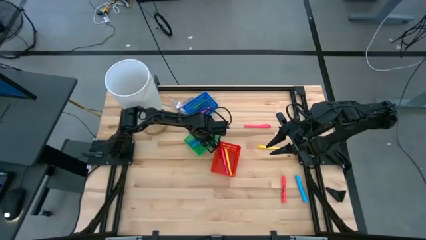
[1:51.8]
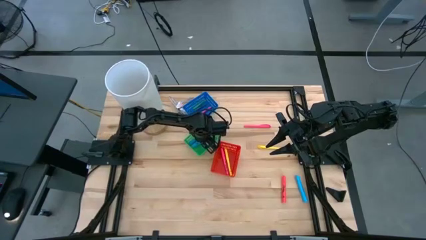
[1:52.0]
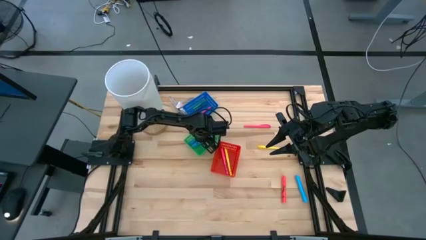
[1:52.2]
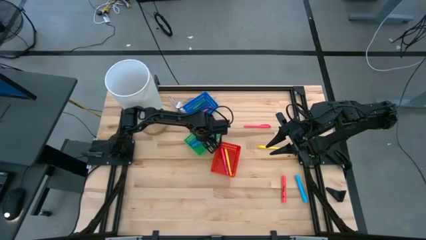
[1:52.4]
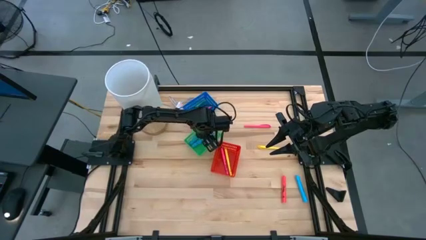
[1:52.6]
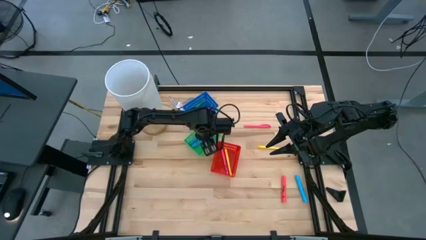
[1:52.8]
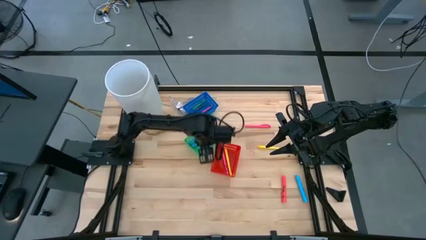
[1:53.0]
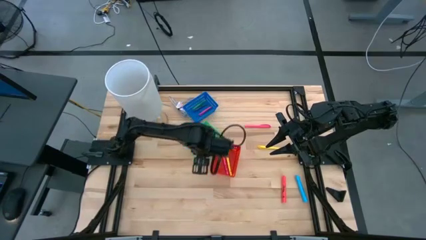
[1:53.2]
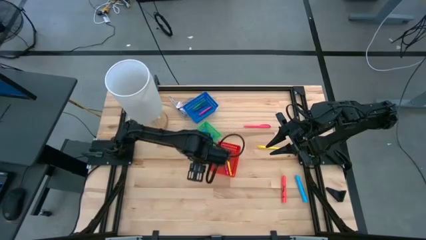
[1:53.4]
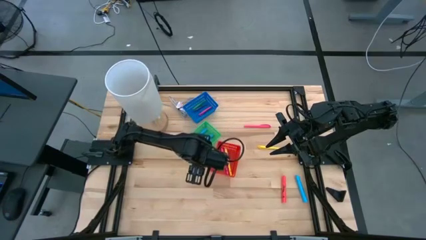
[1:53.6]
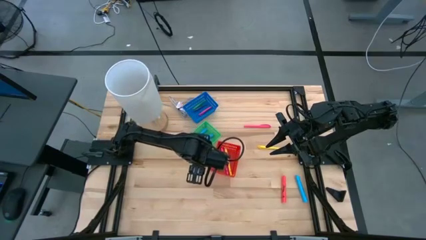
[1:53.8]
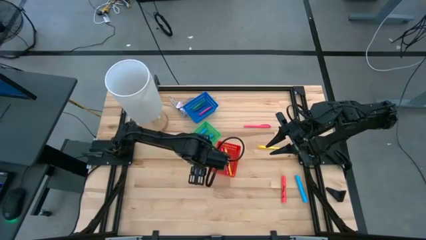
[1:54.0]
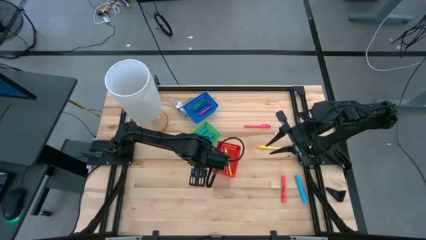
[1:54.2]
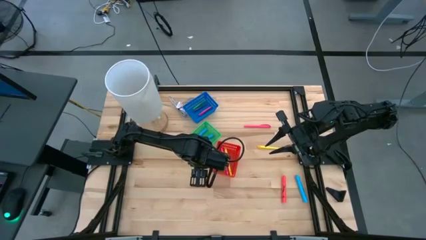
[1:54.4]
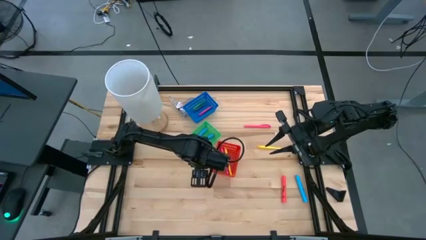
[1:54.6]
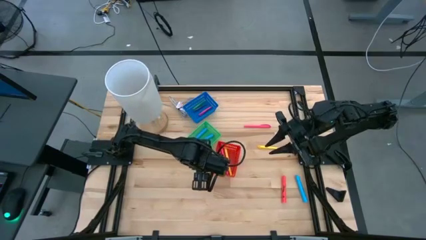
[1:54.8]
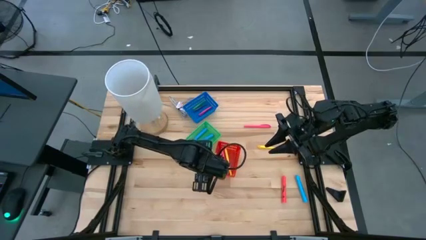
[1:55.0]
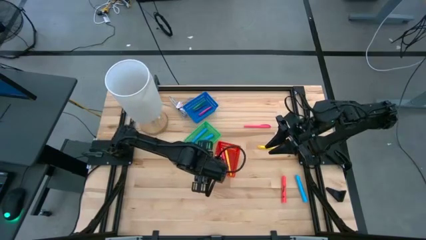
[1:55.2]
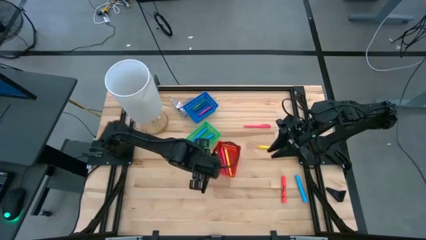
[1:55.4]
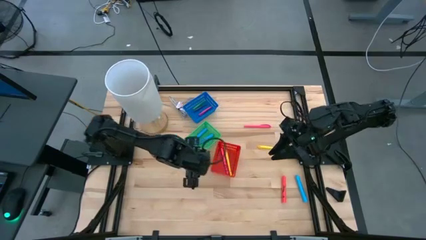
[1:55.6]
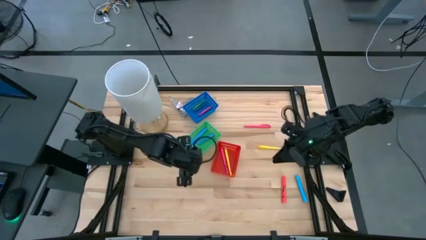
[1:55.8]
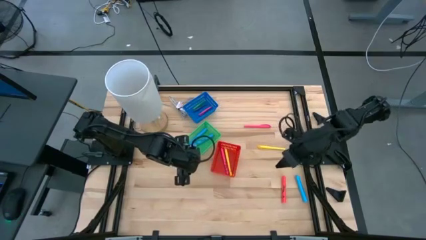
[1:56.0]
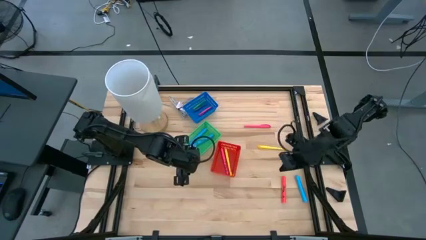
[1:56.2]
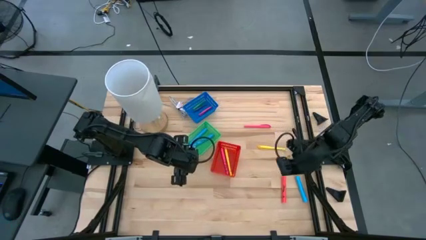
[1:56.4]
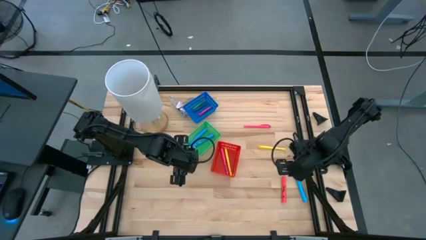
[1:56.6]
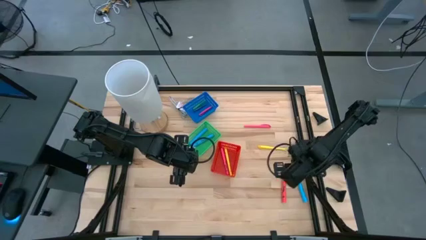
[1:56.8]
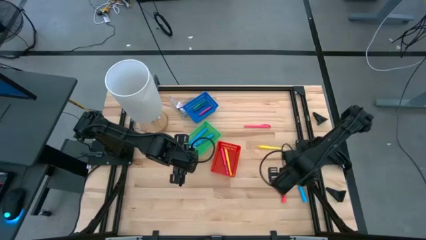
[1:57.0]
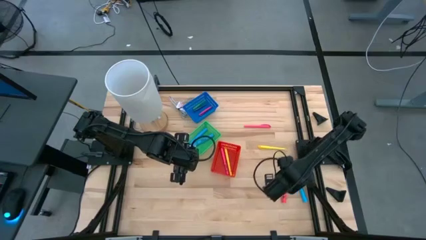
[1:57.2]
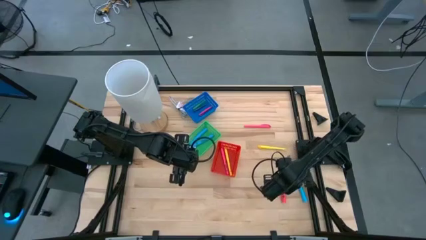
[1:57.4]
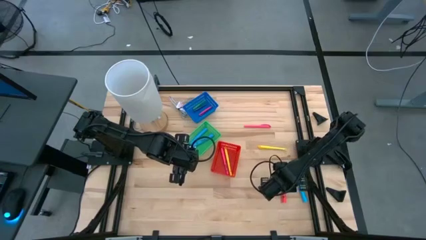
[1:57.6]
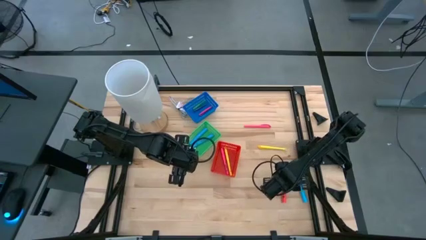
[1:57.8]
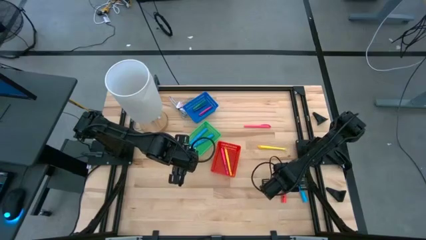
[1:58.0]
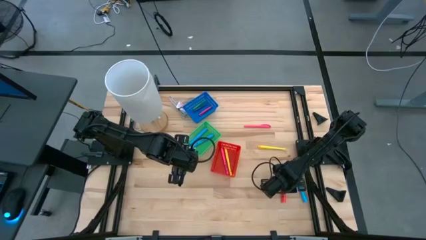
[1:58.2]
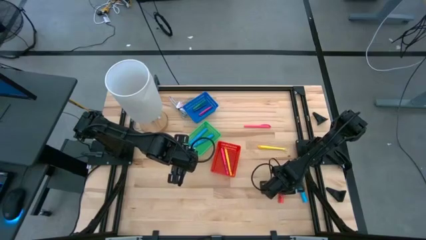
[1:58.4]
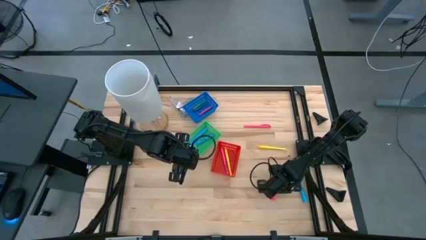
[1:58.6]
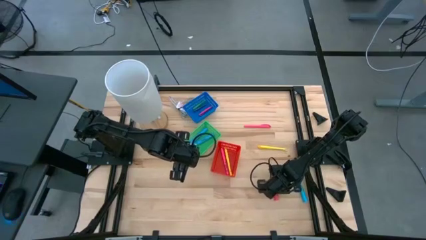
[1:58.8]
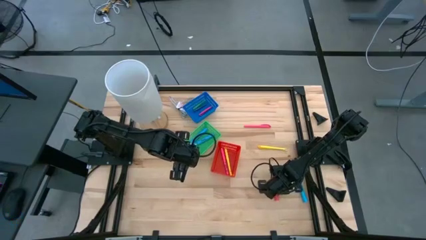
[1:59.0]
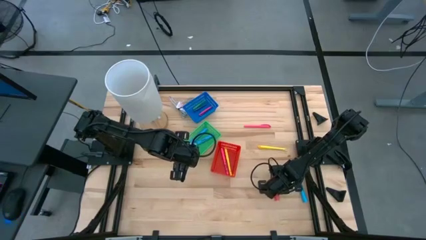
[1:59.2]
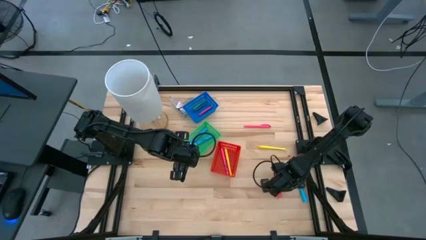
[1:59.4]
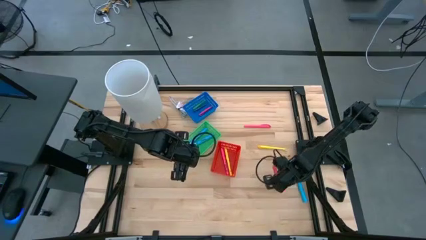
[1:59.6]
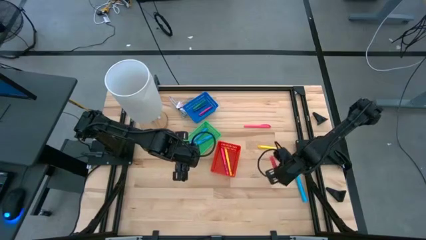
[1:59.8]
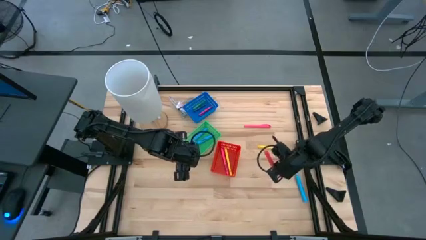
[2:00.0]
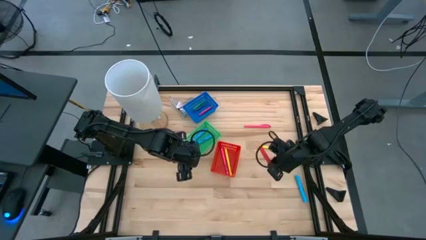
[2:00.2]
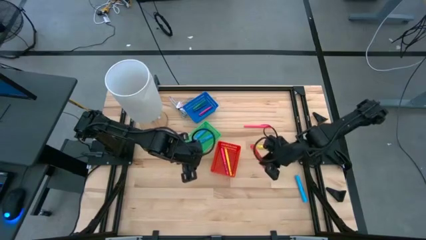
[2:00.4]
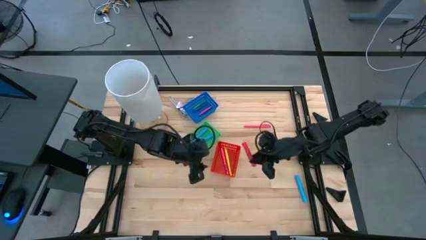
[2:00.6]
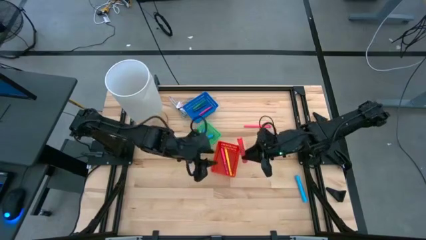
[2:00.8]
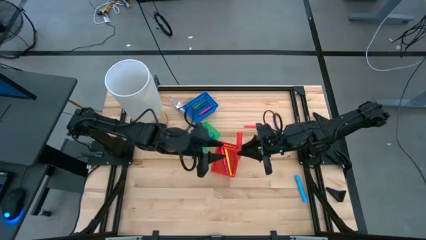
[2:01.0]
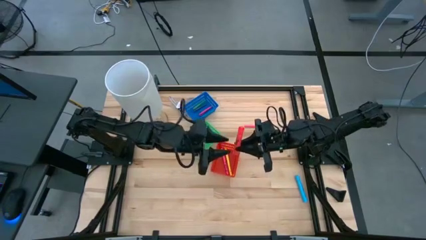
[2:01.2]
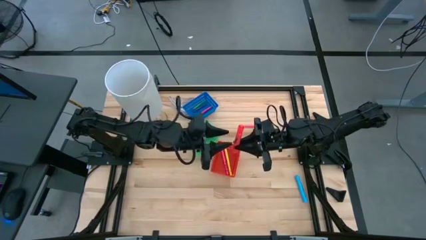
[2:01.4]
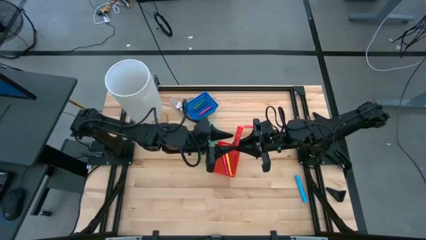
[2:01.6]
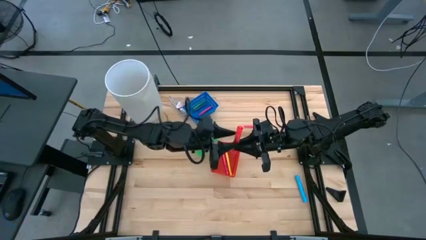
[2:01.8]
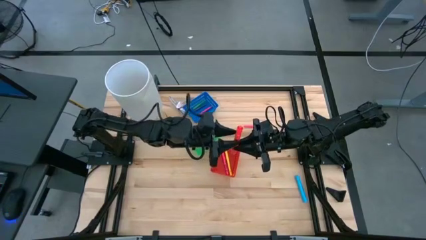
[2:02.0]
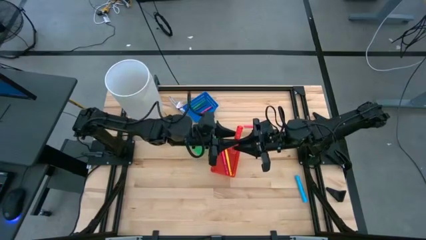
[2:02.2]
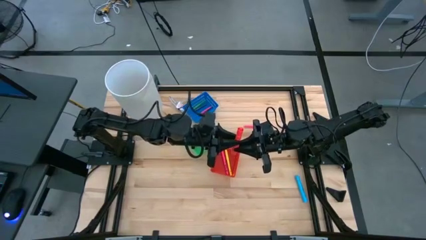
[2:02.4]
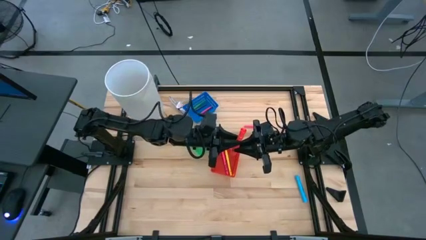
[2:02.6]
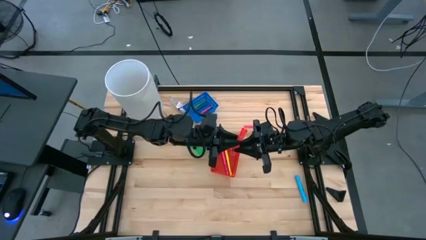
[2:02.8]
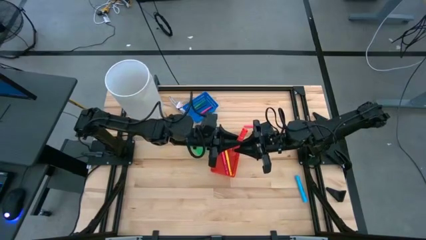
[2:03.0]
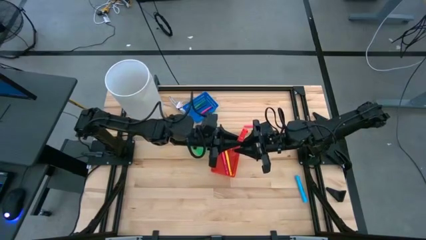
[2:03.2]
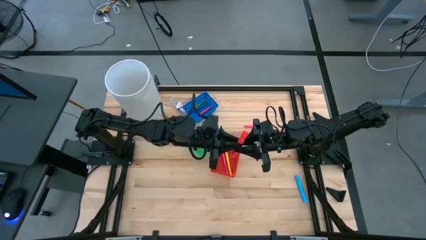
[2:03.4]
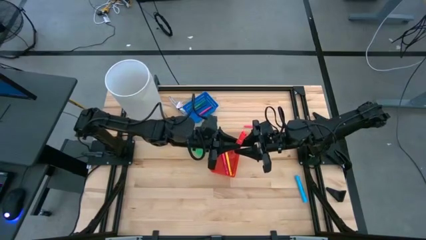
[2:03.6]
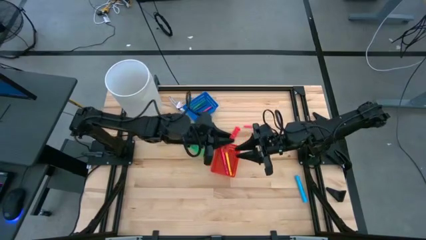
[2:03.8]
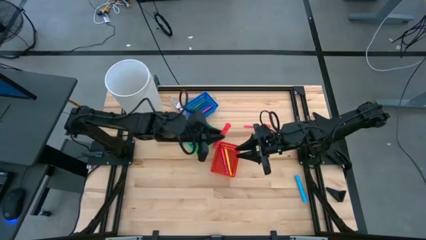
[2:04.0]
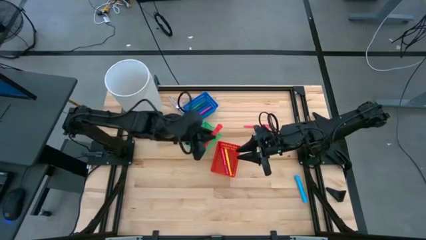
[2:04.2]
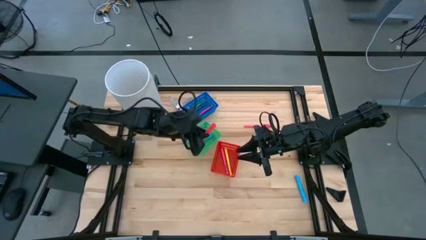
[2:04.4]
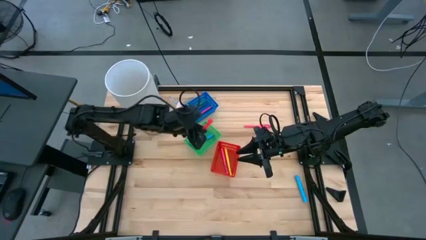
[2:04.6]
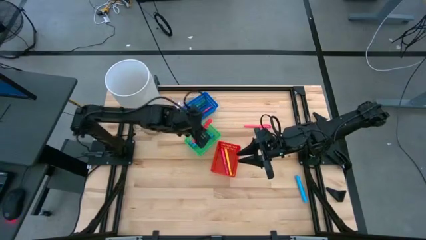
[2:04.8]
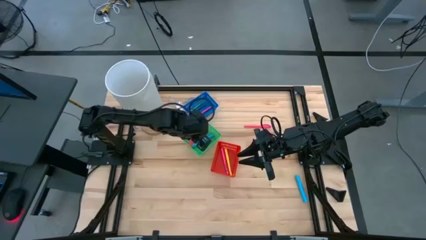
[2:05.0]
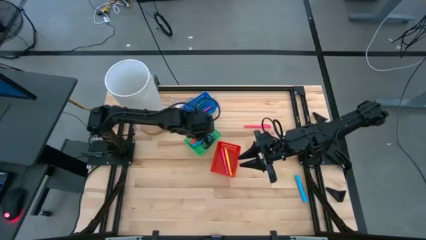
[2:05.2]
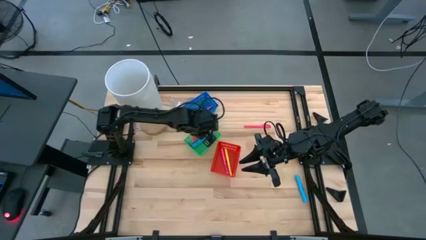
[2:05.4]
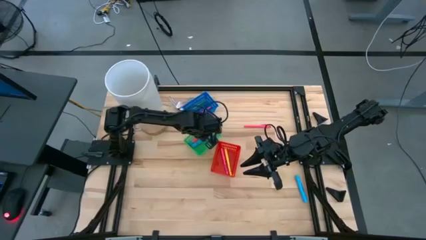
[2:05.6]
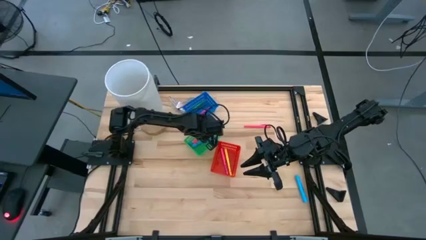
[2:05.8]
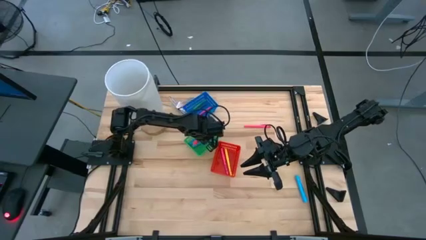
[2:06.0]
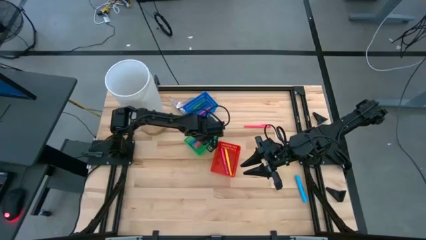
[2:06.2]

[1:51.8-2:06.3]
Task: Pick & Place Markers
Put the orange highlighter pen into the green bin
